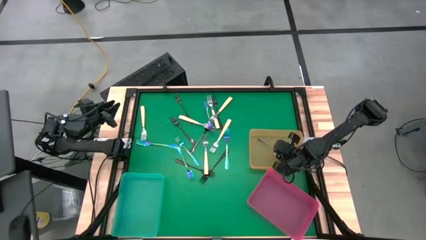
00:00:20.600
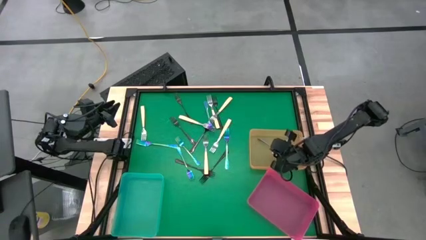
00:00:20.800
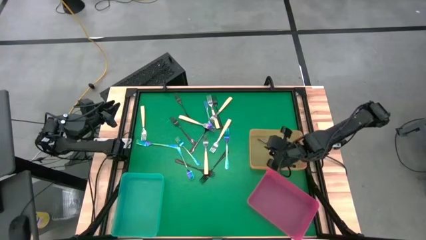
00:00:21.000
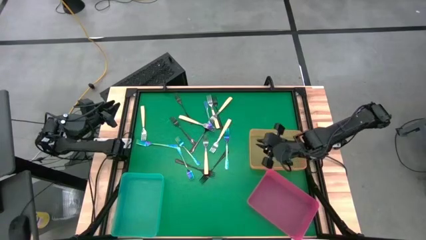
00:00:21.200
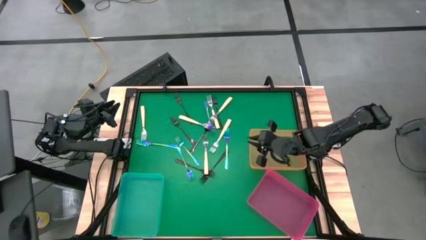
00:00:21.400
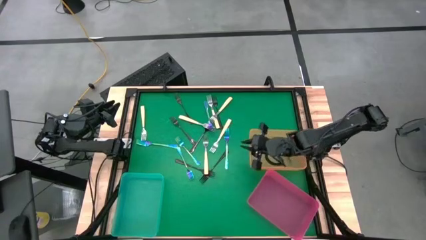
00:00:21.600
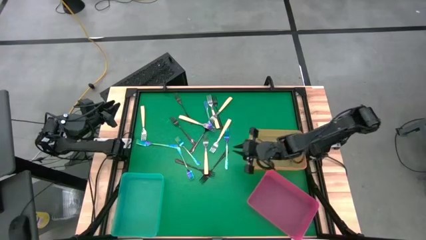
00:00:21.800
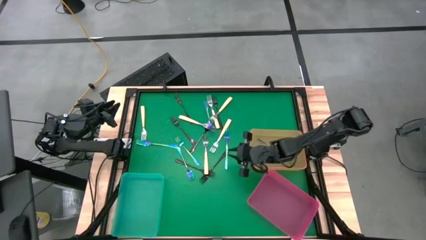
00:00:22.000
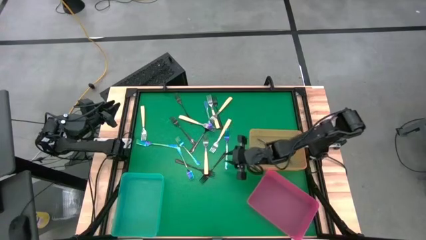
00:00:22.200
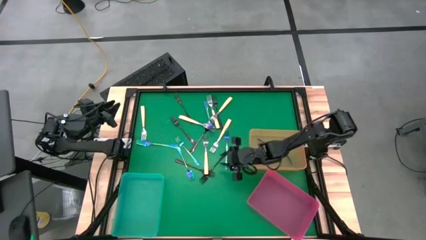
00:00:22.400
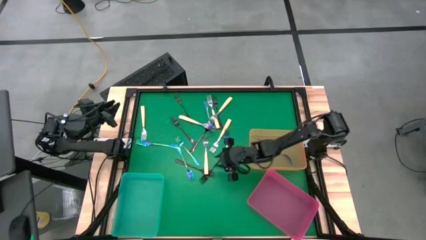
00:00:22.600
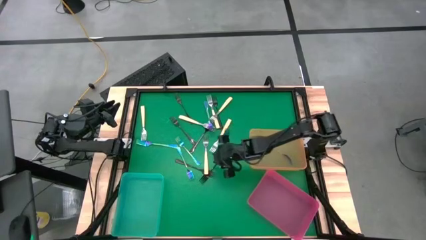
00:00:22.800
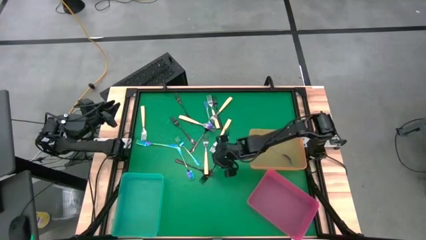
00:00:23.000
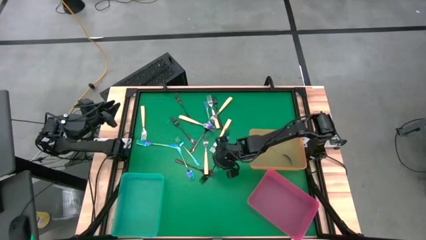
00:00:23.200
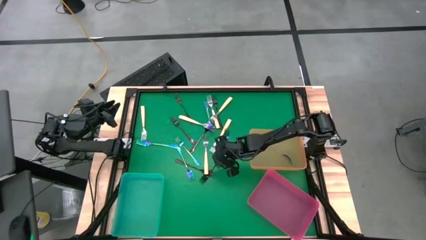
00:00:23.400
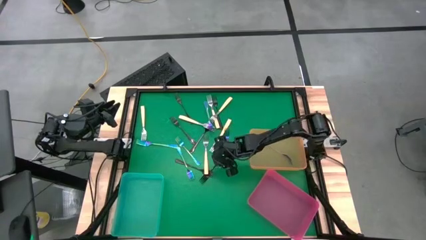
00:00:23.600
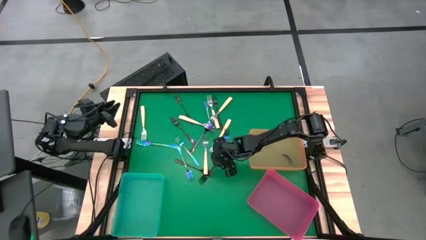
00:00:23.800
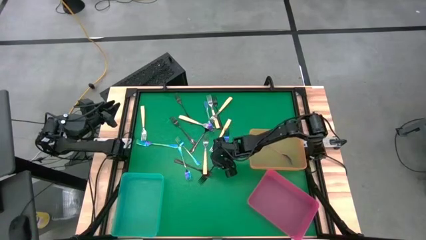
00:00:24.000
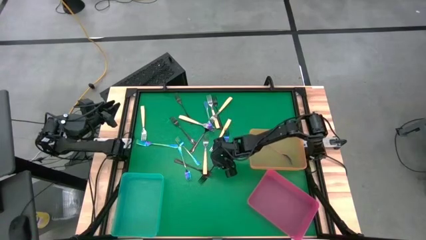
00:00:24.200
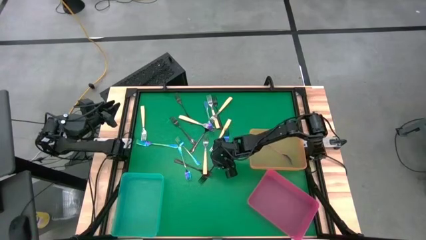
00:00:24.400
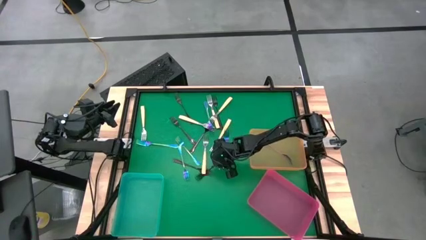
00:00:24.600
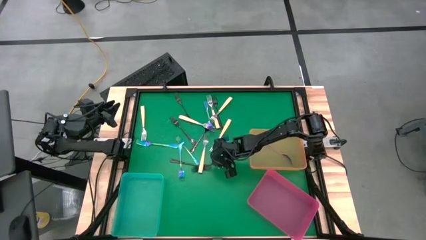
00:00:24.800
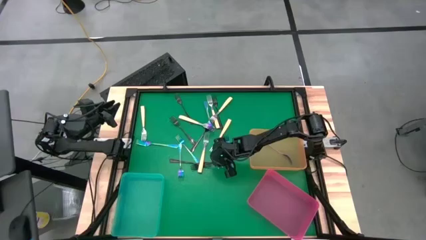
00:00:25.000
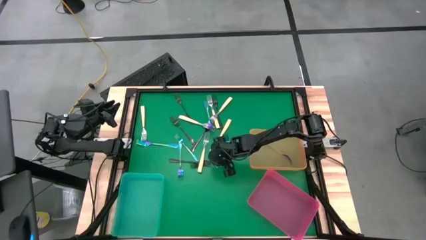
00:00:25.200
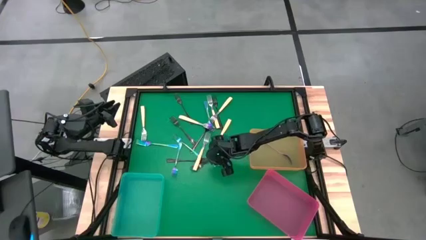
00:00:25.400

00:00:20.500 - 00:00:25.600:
Task: Sort silverware by color (type)
Put the black fork into the pink bin

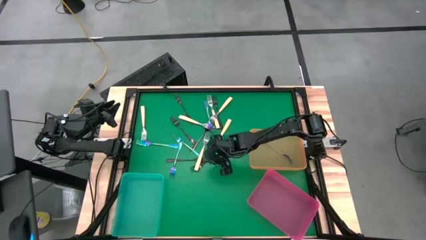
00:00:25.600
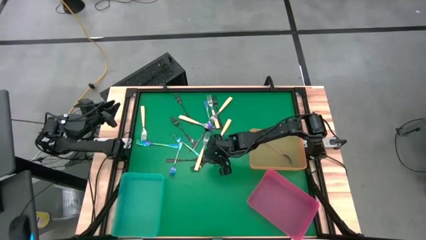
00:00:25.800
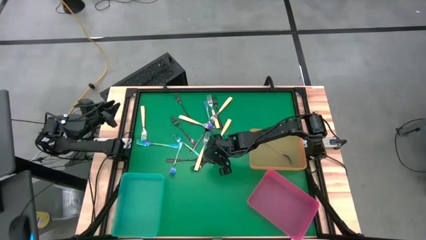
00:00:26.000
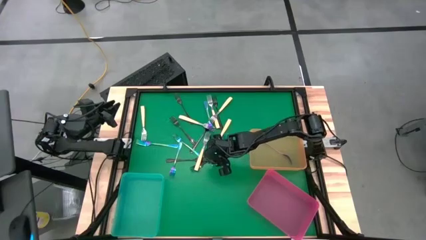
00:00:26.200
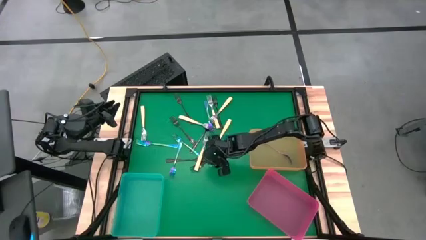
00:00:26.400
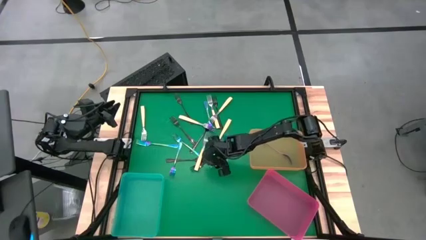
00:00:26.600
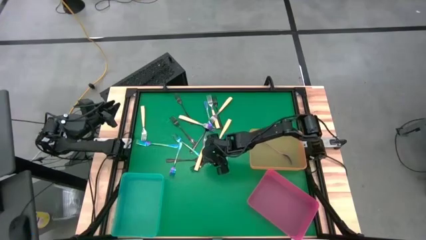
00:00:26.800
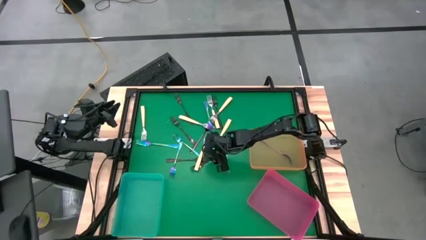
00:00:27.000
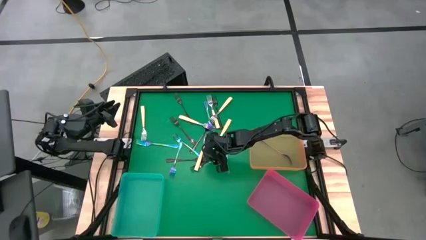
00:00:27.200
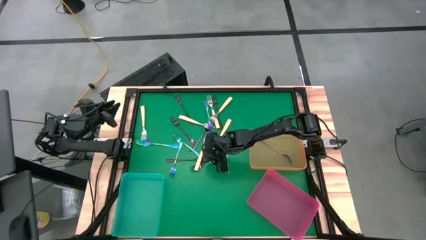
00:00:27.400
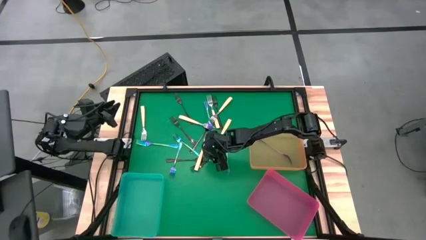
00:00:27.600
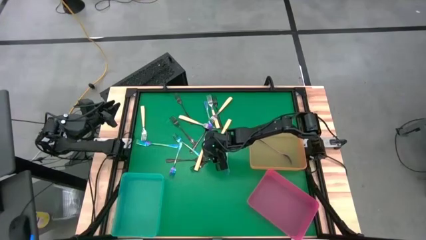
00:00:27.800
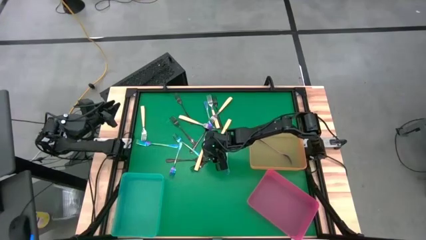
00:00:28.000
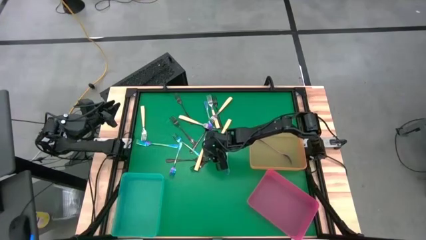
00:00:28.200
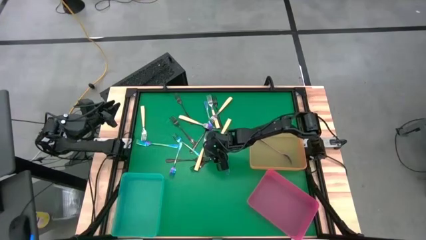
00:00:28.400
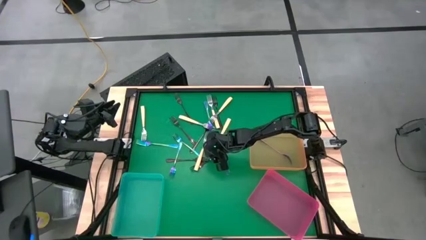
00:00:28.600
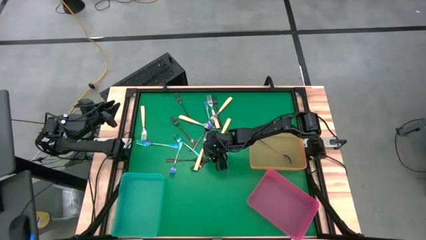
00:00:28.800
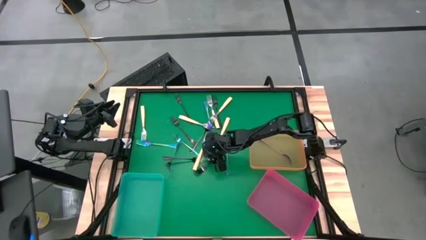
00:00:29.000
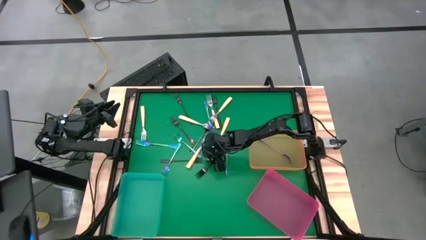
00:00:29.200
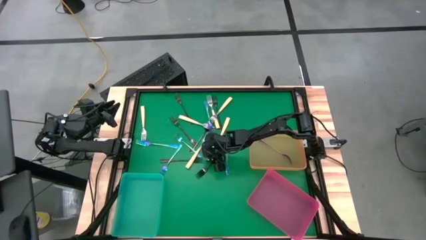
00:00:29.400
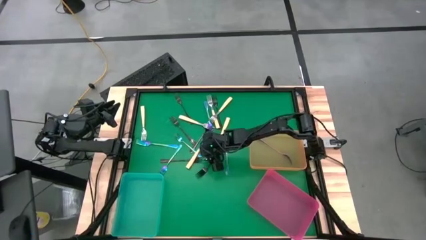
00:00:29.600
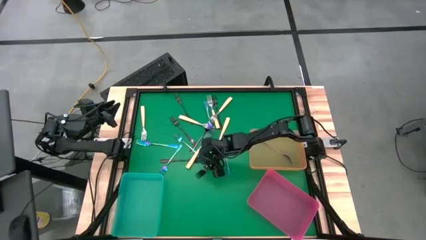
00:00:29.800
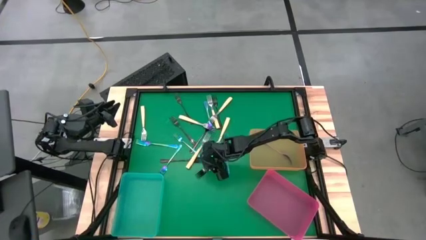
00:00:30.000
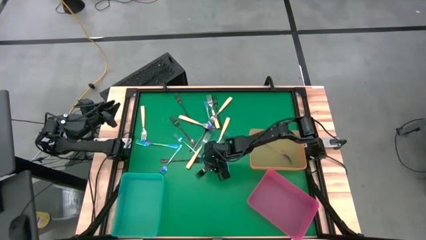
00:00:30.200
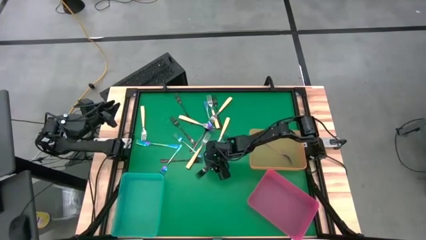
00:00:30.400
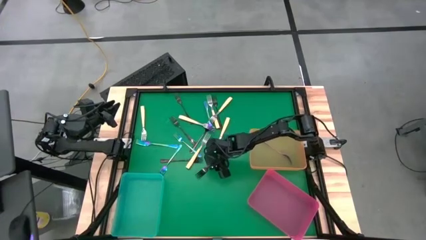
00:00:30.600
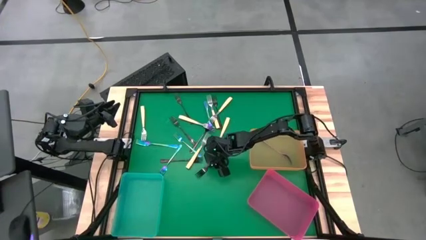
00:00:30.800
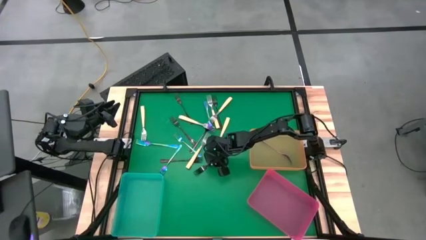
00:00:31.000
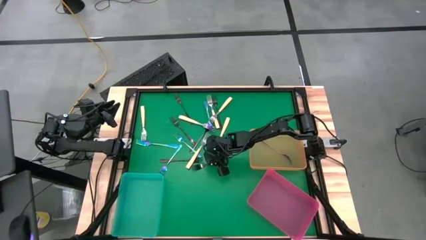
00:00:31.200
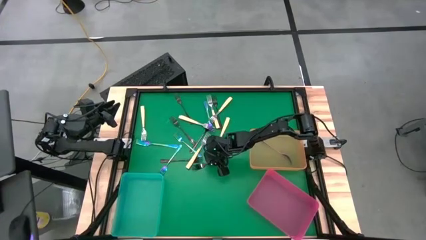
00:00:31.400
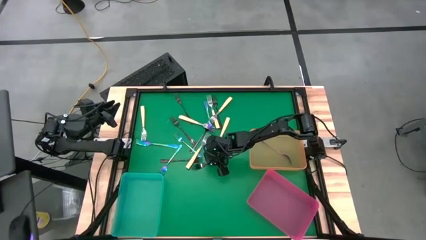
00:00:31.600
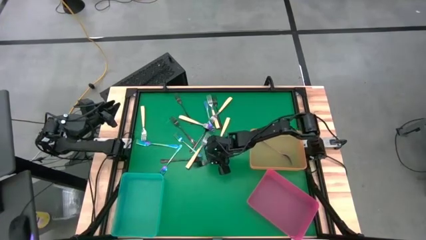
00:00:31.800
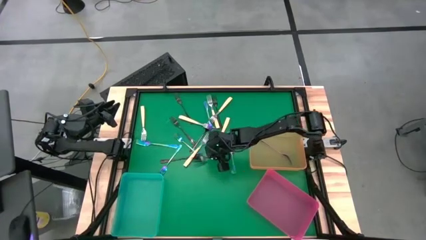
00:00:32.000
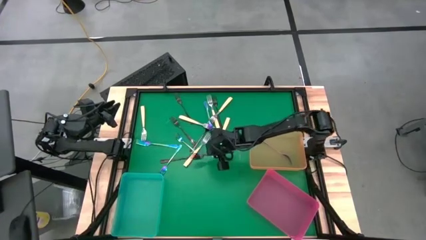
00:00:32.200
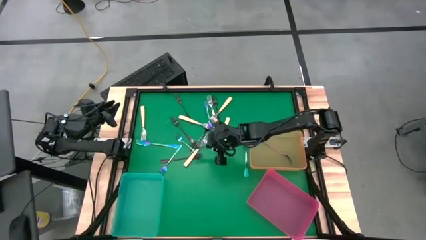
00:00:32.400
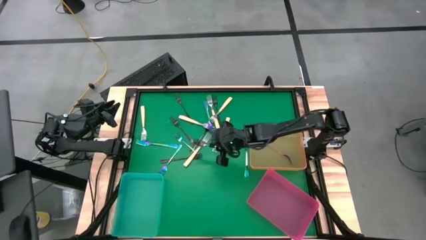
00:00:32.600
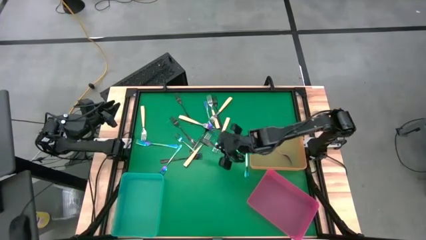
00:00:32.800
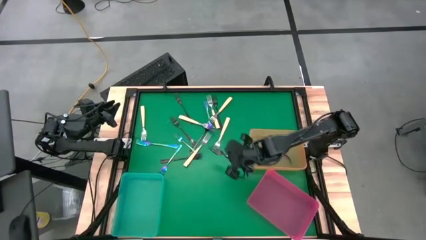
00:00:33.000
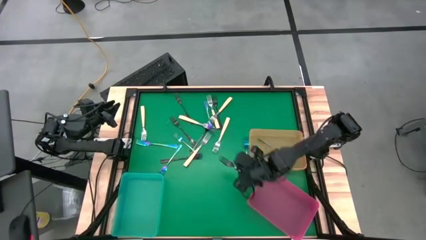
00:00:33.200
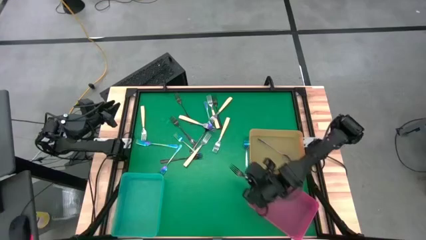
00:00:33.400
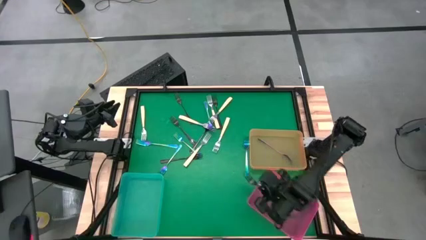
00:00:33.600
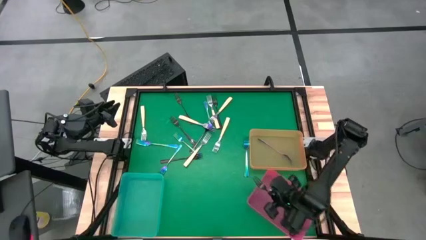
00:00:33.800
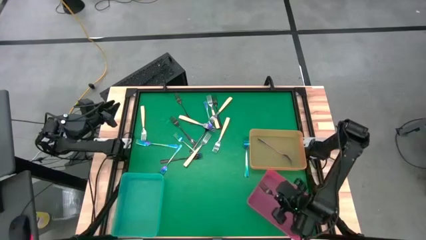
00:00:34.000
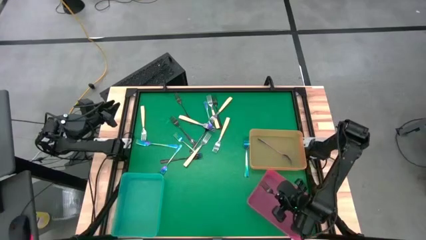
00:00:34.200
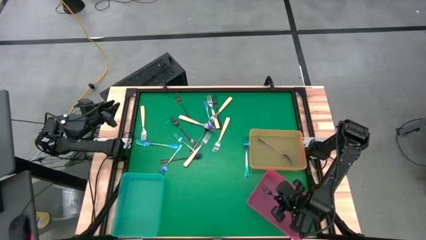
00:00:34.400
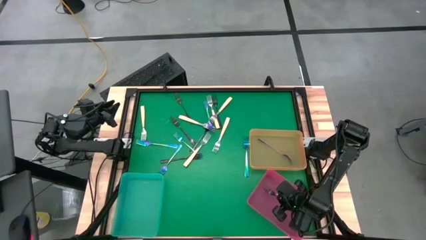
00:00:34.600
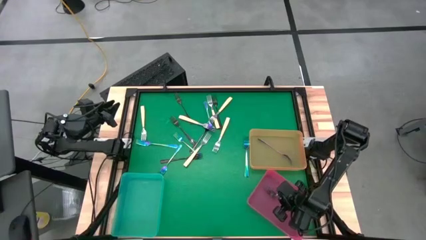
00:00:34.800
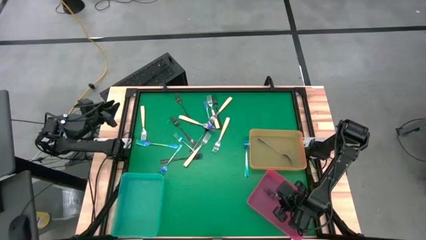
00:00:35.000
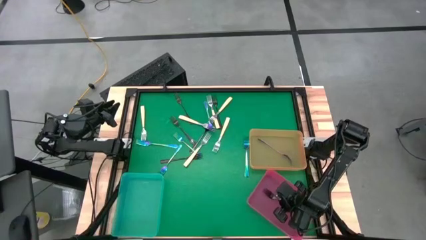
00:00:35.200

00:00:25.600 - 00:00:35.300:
Put the black fork into the pink bin

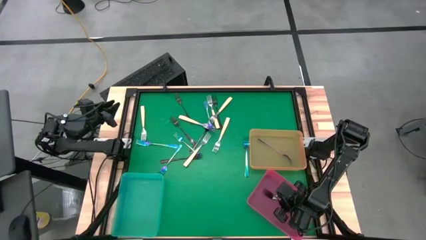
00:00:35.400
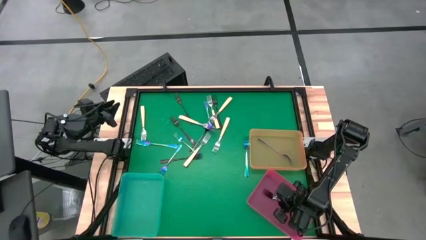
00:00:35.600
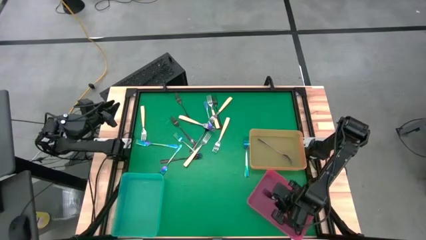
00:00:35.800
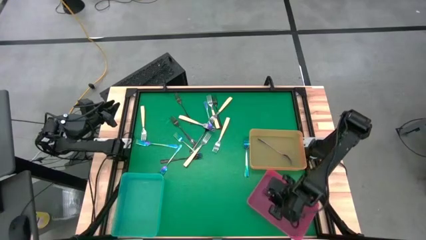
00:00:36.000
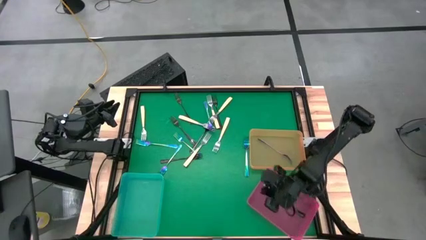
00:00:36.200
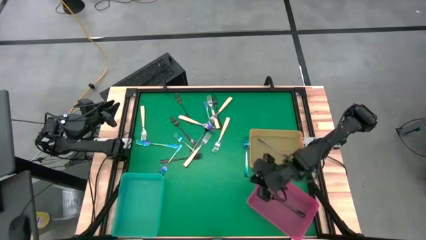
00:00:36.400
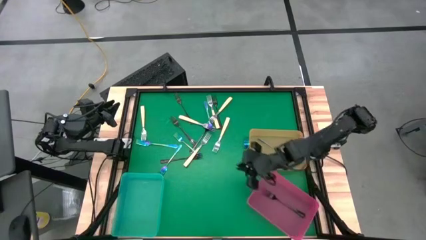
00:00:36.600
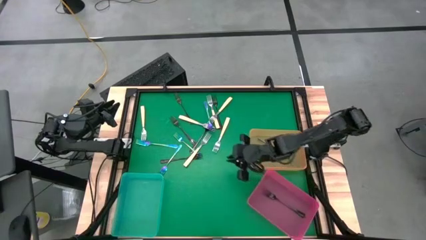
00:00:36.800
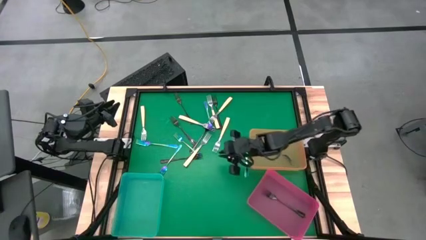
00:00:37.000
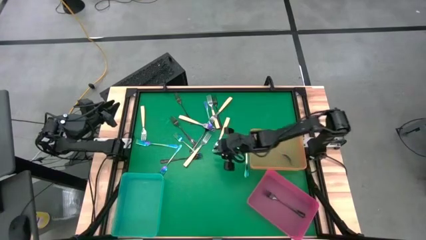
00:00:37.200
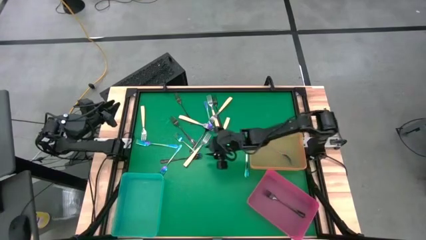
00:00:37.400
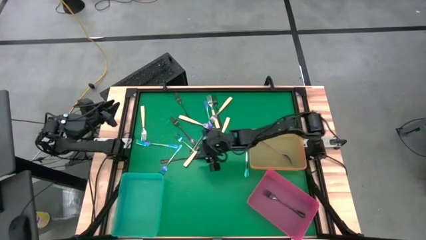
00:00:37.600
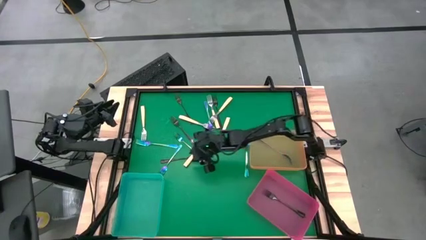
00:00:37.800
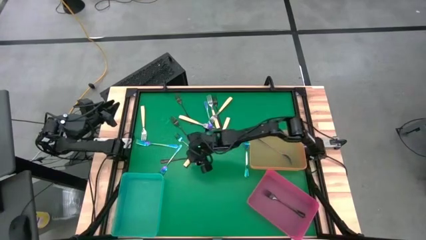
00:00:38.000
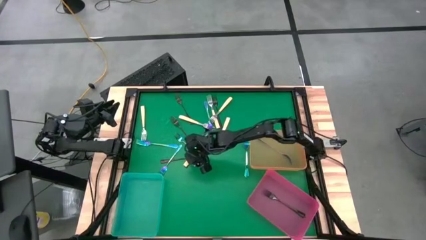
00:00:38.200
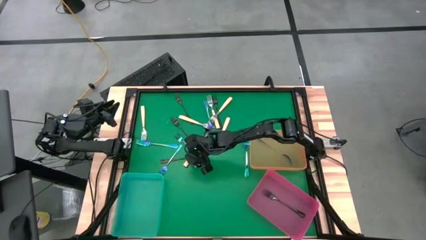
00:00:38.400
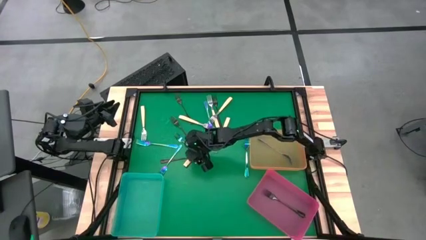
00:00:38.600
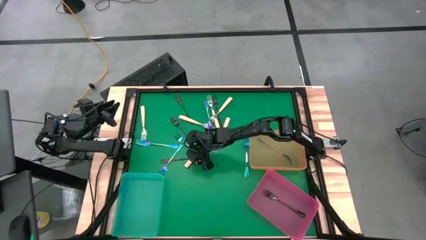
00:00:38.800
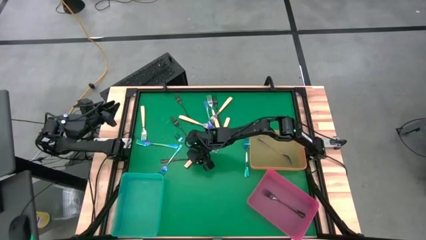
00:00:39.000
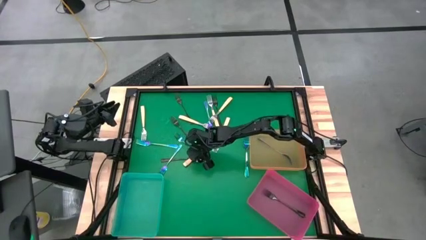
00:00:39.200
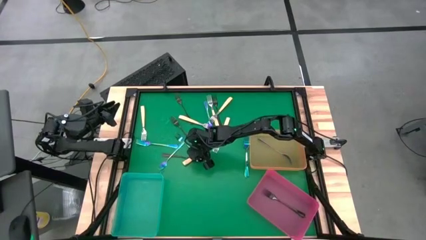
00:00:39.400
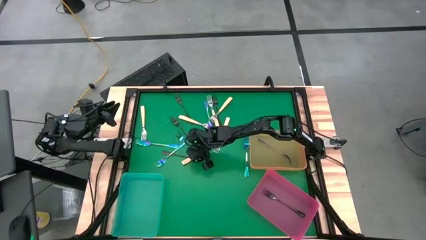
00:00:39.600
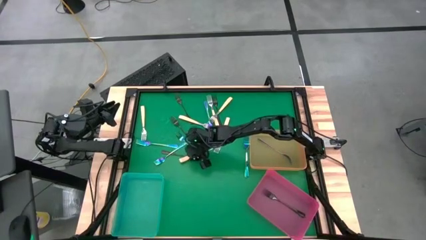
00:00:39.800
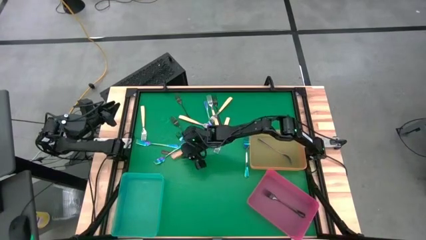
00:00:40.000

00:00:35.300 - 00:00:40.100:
Put the yellow fork into the blue bin
